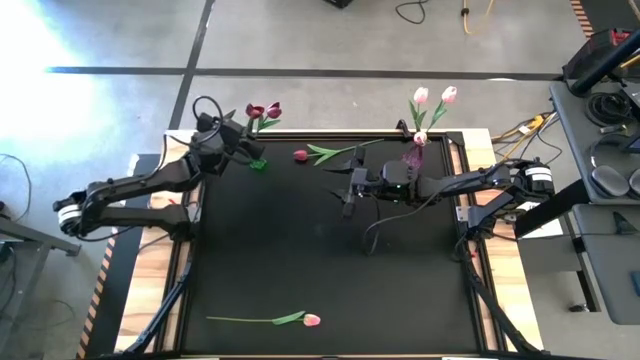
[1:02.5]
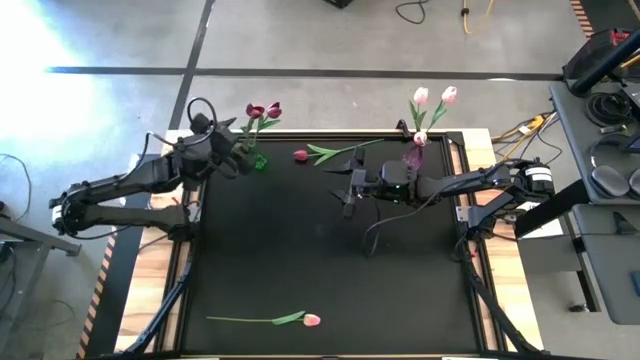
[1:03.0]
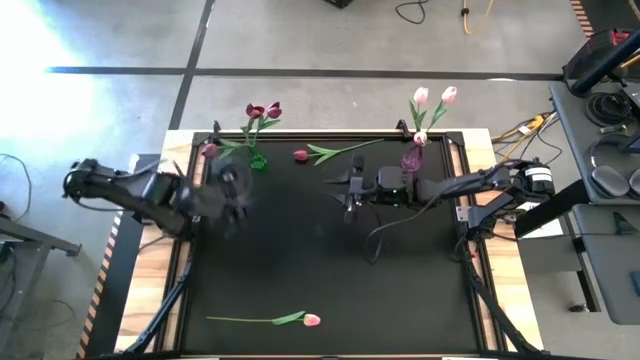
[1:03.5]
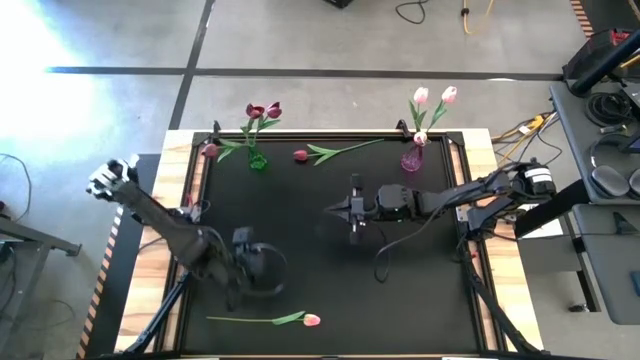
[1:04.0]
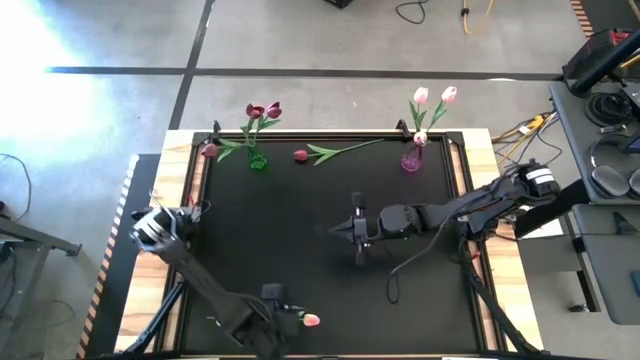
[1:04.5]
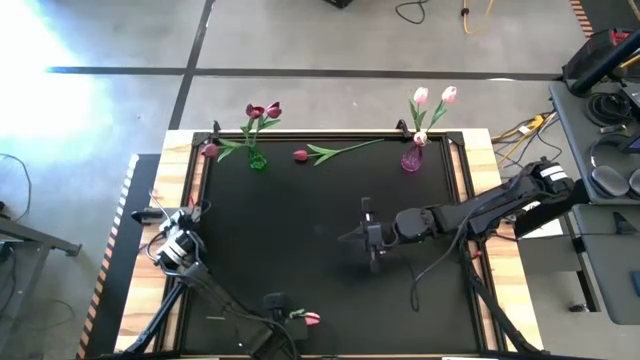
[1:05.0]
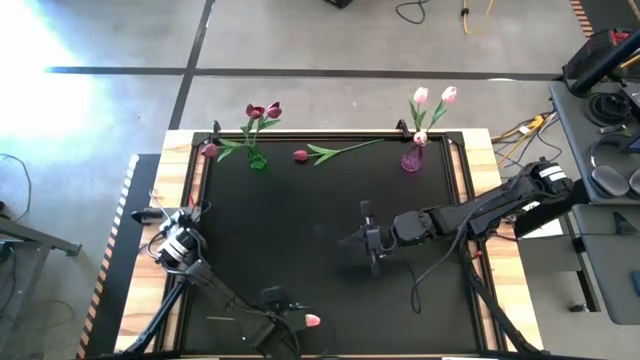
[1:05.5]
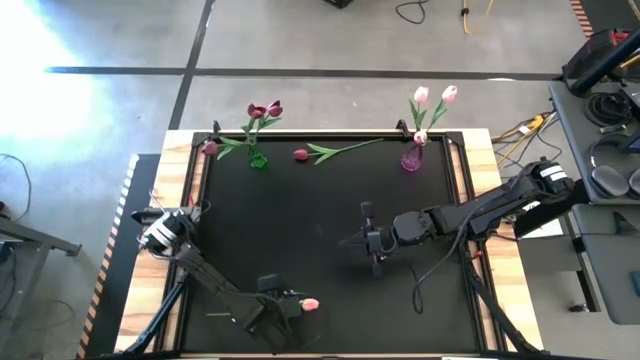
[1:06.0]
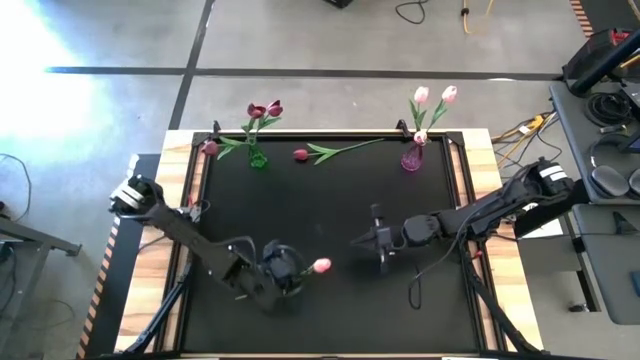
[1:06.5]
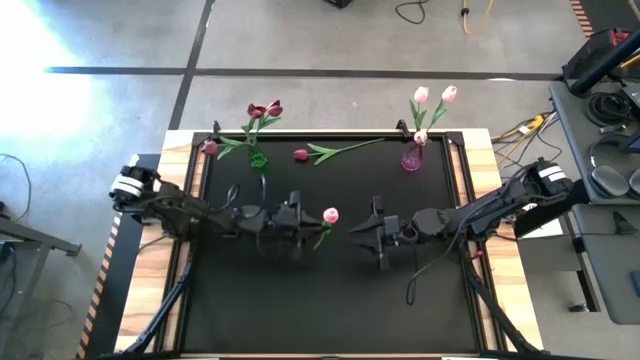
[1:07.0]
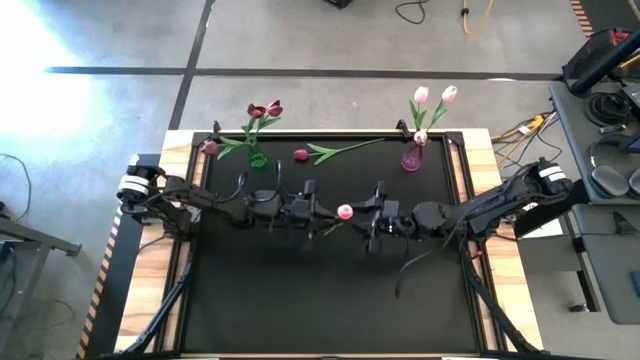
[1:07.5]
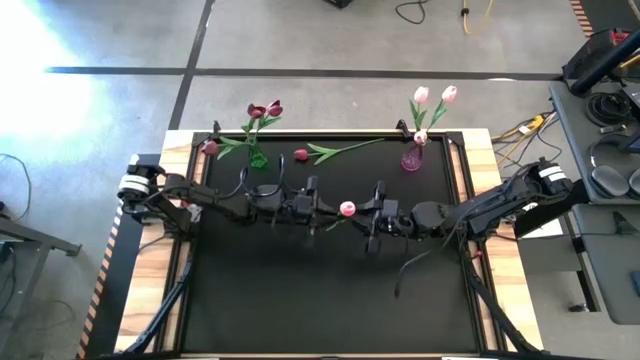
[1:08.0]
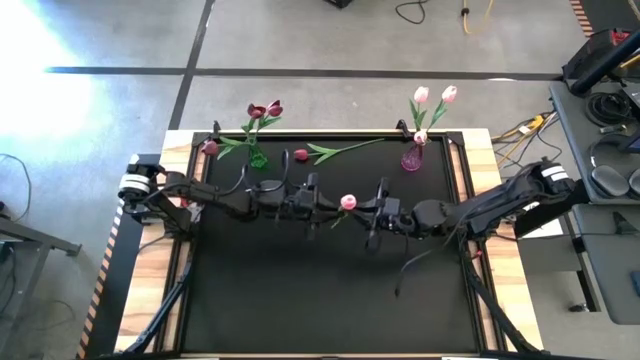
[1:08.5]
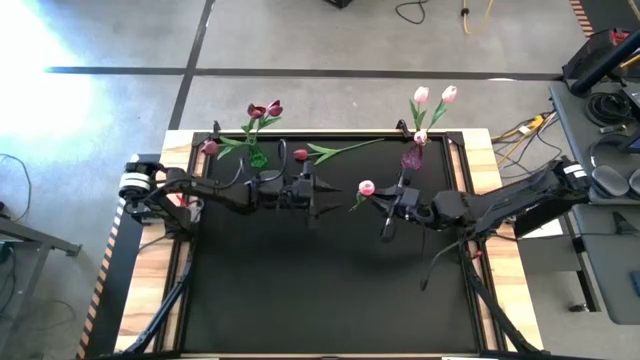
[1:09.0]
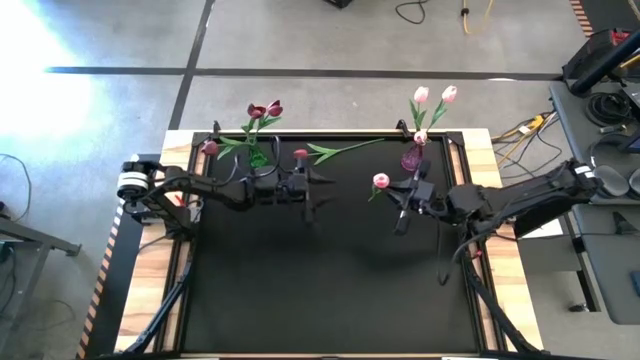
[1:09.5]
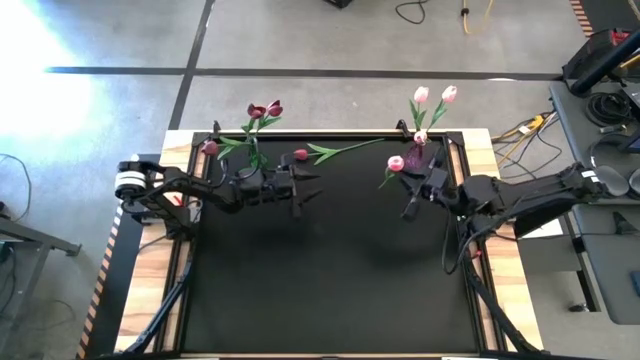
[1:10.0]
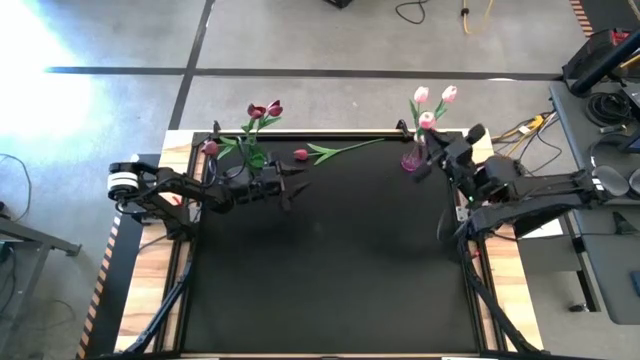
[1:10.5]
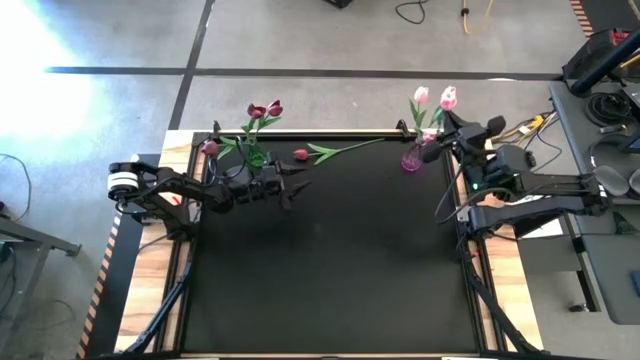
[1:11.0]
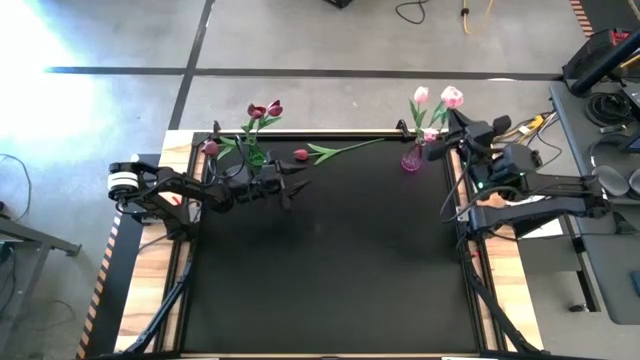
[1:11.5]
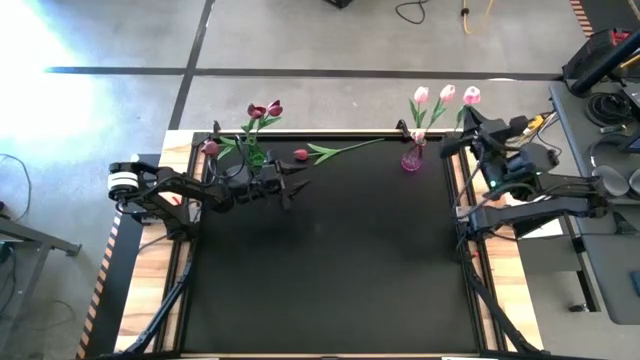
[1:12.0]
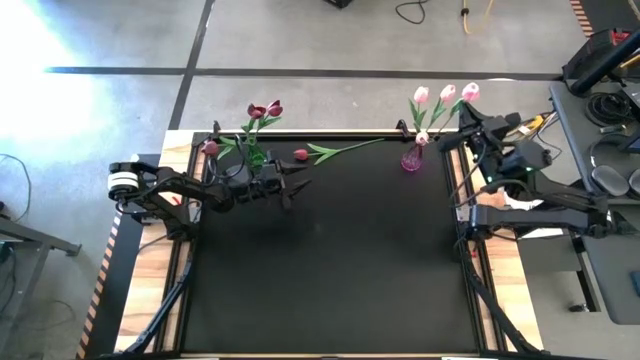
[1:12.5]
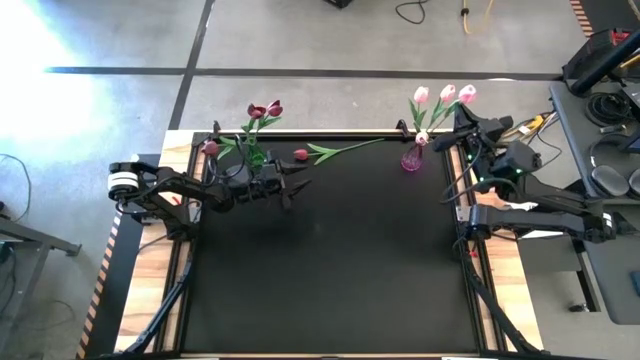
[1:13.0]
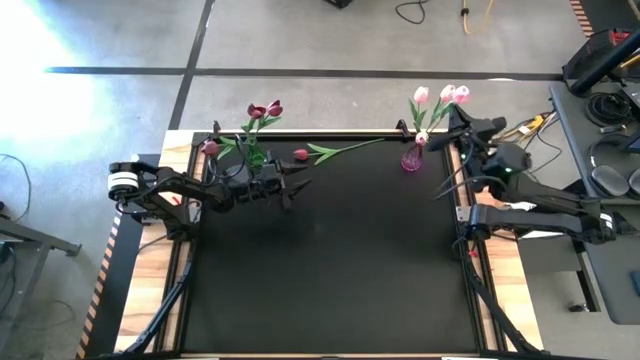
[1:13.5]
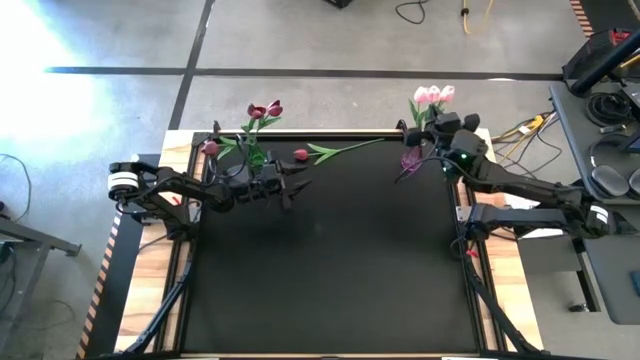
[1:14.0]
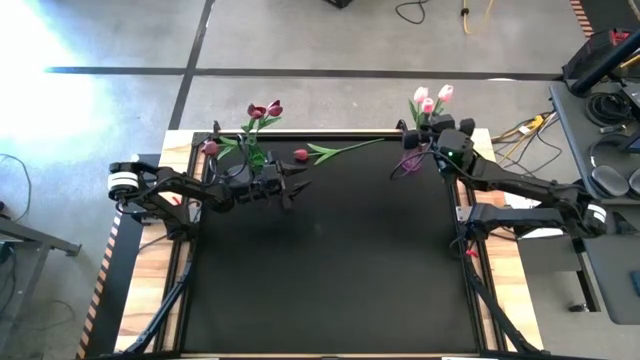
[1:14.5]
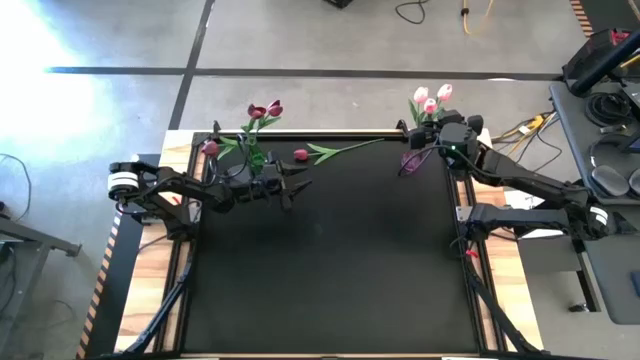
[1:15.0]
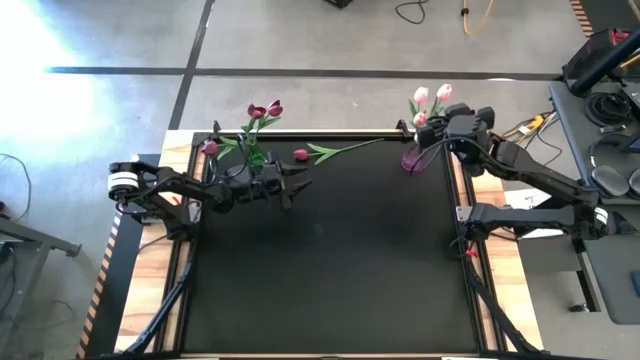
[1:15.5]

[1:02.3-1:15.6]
Task: Sort flowers into vase by color
Put the pink flower into the violet vase

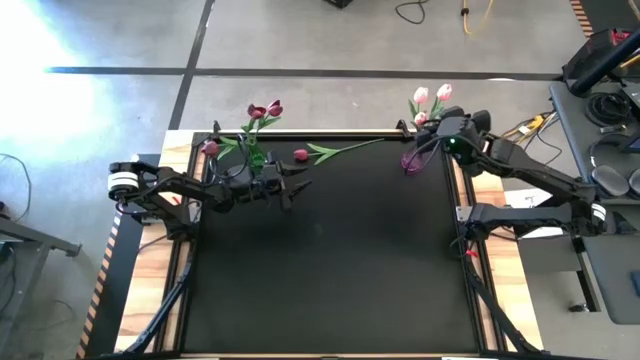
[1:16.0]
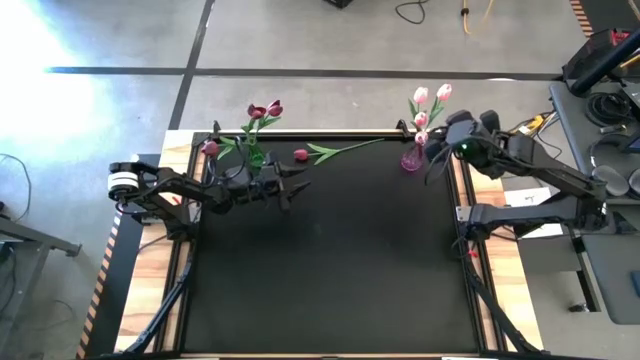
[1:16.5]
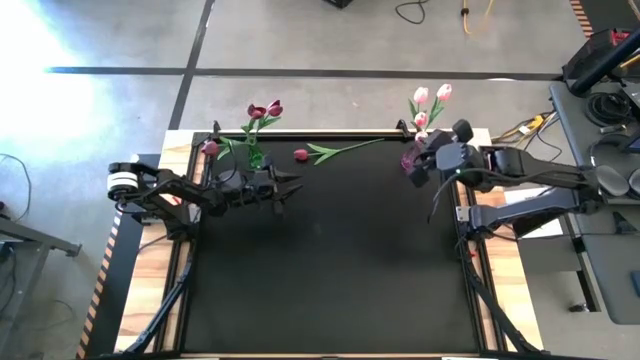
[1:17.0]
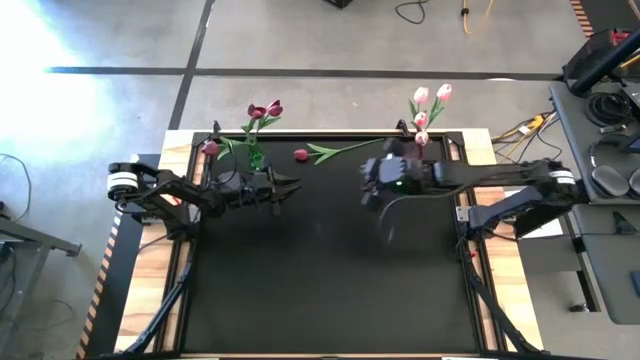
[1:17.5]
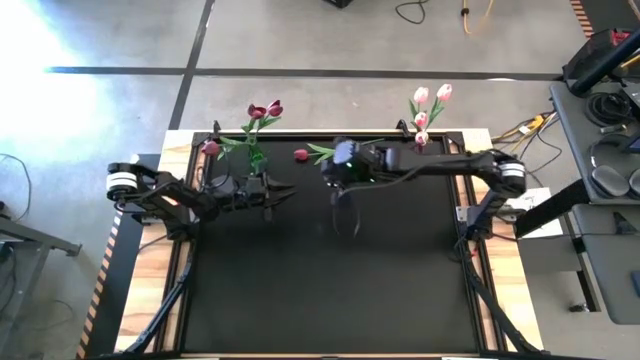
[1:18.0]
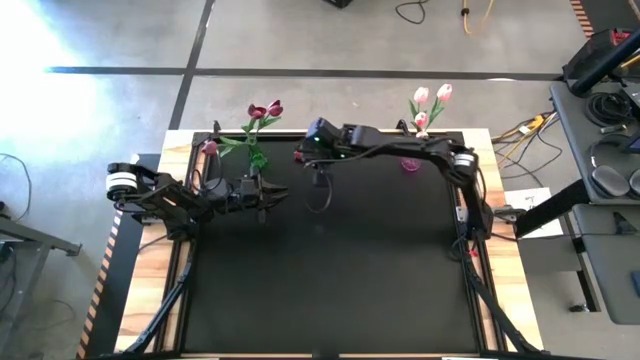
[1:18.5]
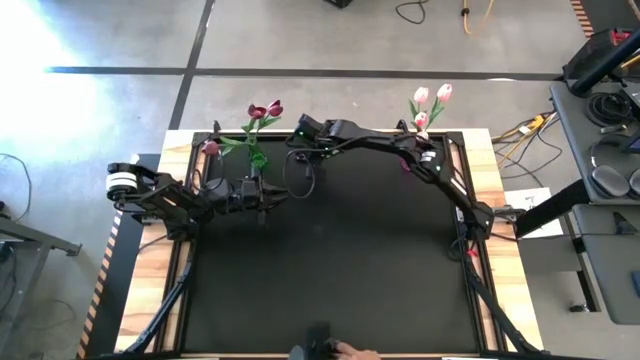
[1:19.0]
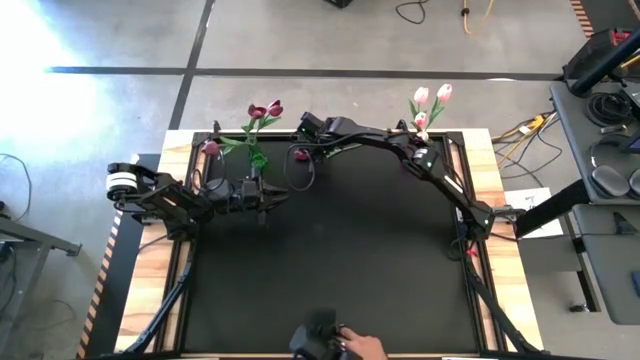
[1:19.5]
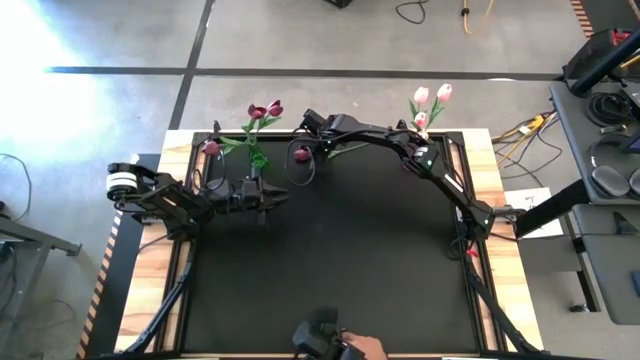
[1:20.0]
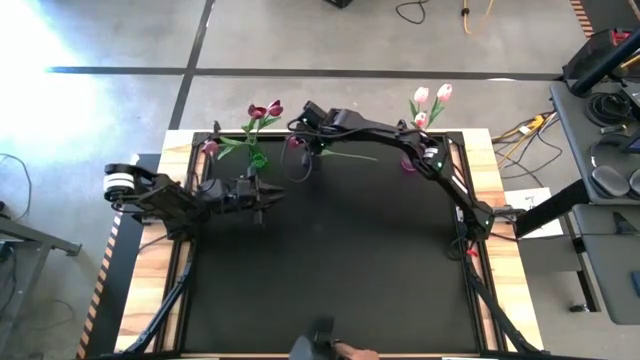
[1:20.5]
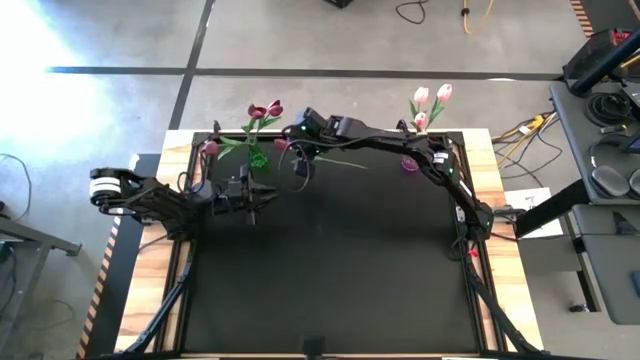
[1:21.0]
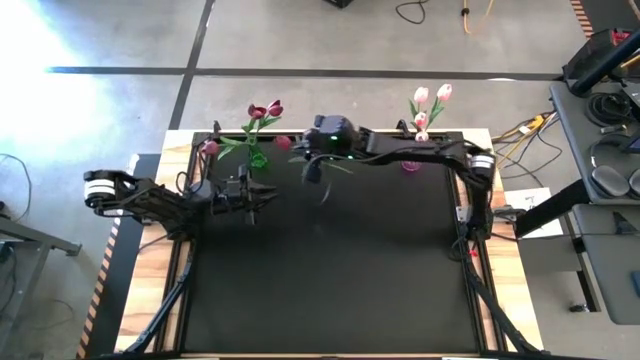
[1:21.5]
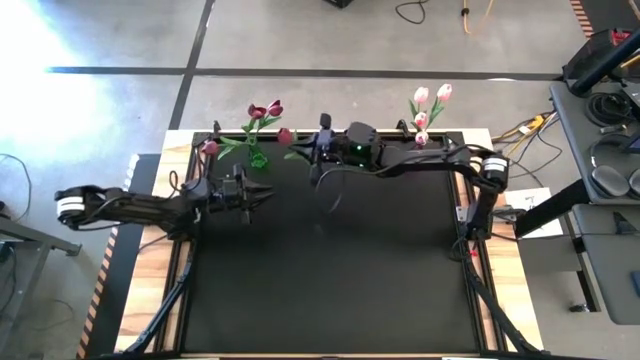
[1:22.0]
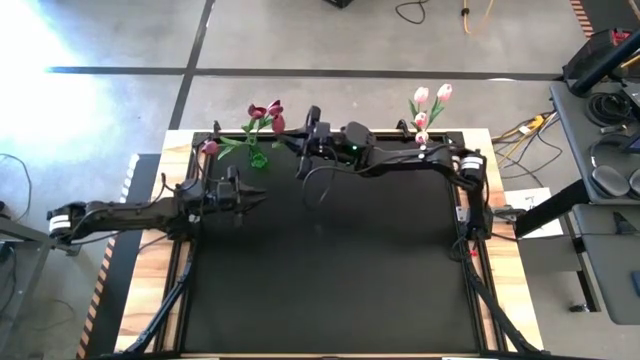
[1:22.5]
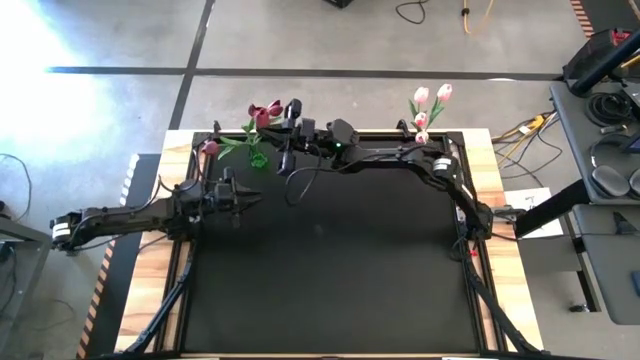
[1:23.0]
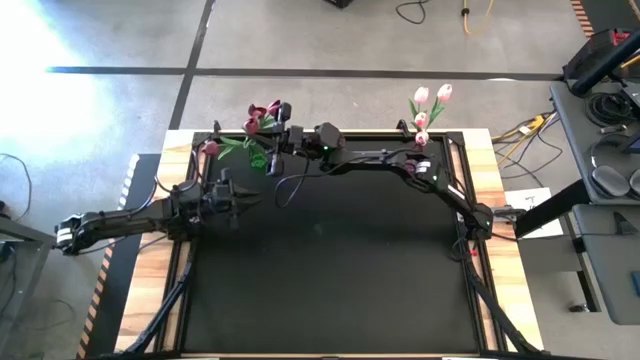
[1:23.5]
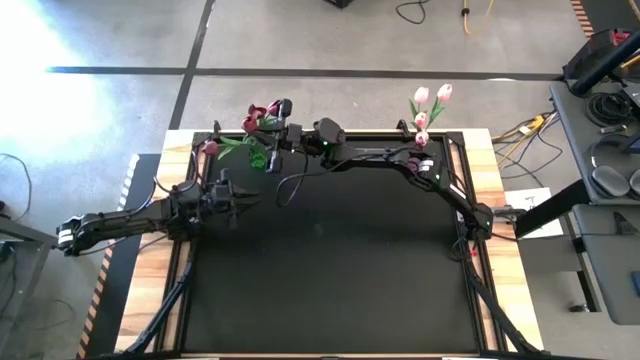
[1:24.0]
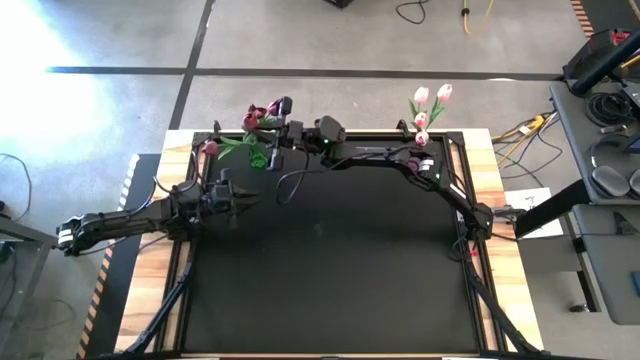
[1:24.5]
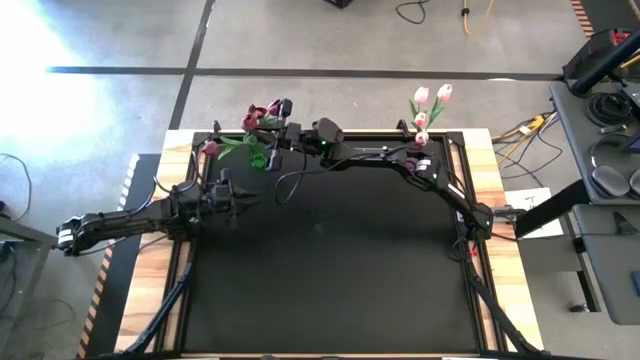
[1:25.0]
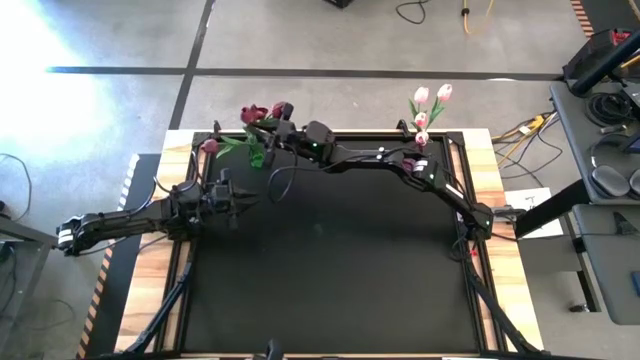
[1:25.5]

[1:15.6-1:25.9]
Put the red flower into the green vase
